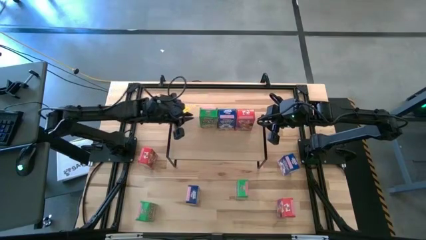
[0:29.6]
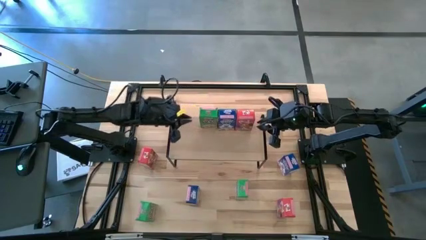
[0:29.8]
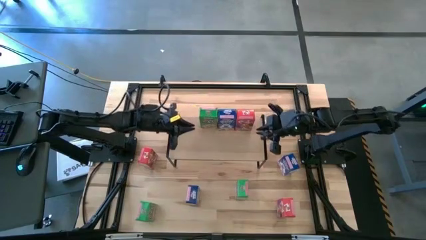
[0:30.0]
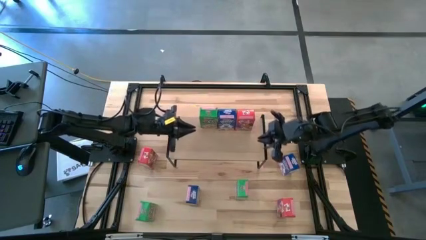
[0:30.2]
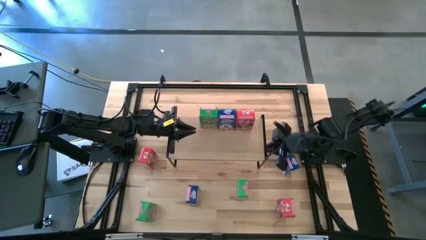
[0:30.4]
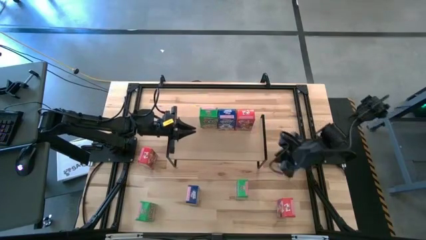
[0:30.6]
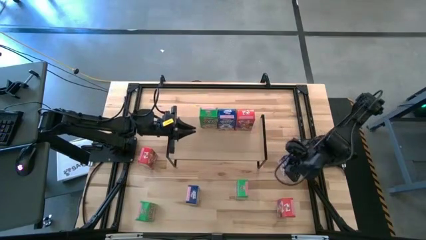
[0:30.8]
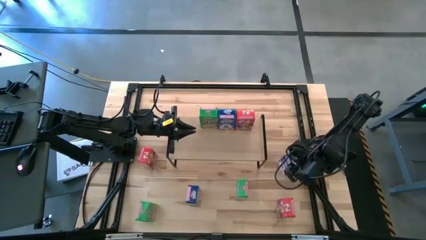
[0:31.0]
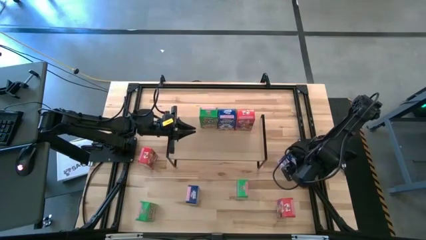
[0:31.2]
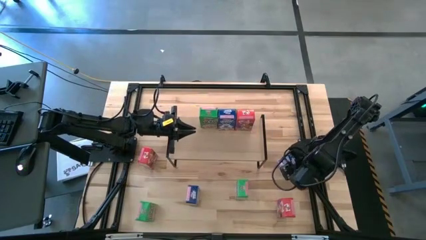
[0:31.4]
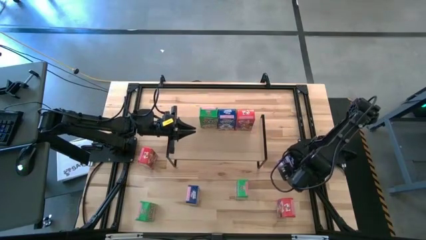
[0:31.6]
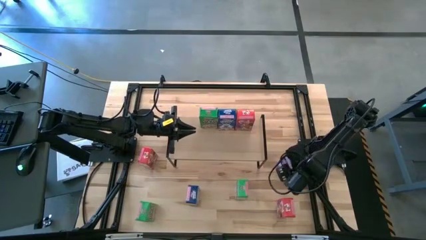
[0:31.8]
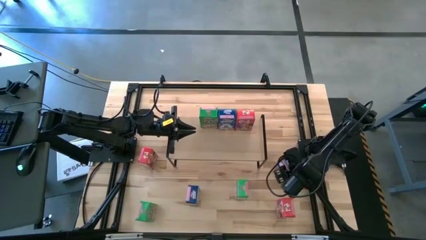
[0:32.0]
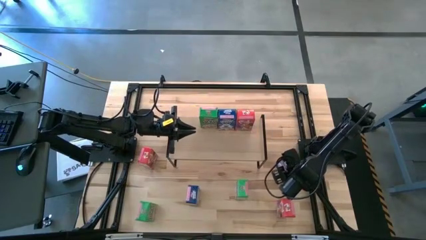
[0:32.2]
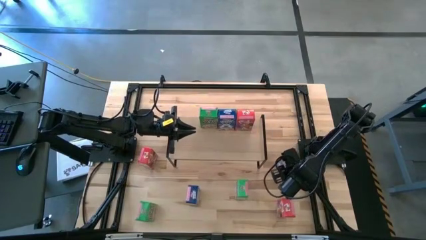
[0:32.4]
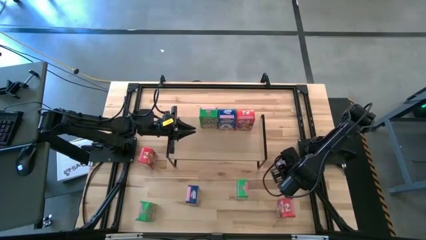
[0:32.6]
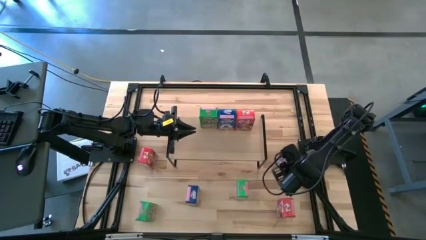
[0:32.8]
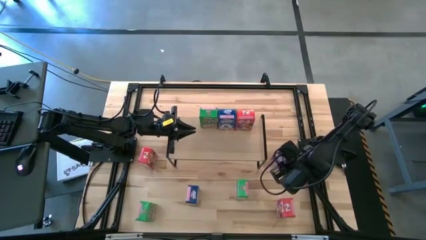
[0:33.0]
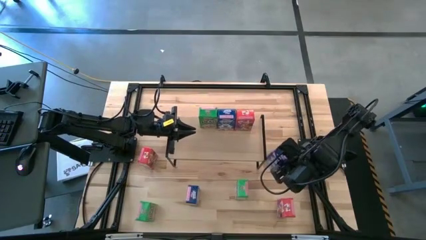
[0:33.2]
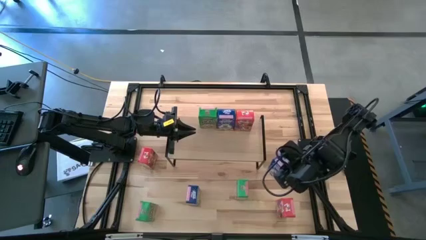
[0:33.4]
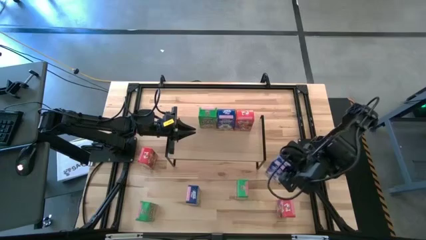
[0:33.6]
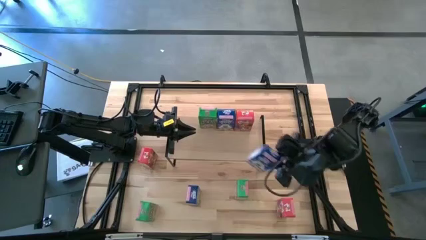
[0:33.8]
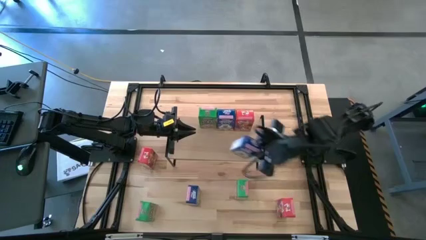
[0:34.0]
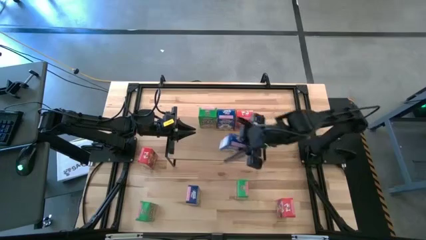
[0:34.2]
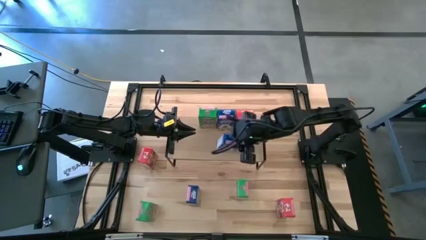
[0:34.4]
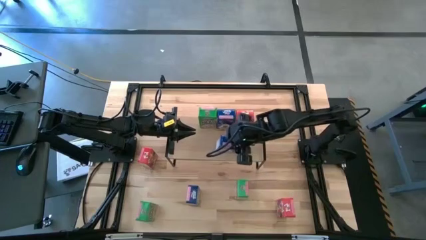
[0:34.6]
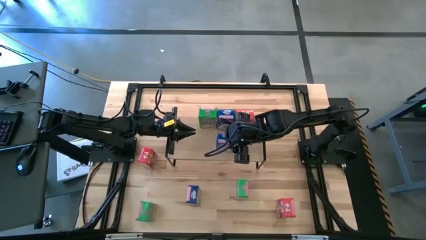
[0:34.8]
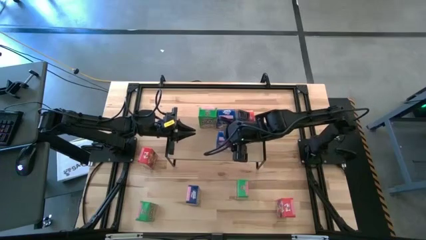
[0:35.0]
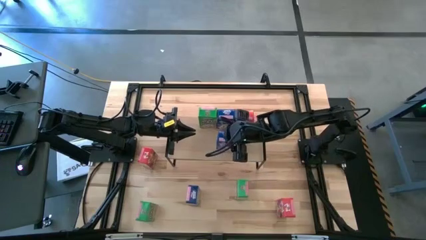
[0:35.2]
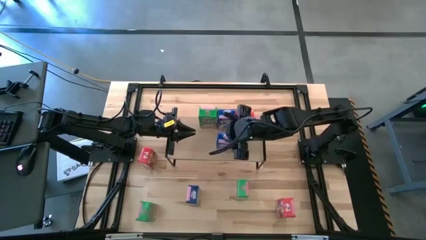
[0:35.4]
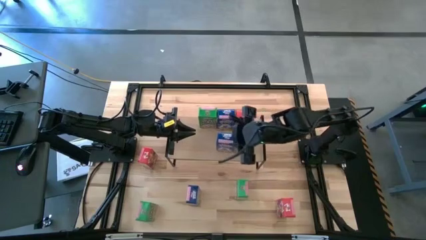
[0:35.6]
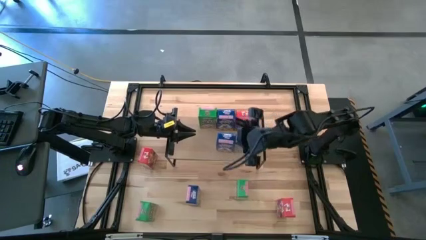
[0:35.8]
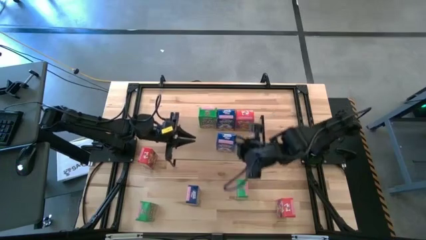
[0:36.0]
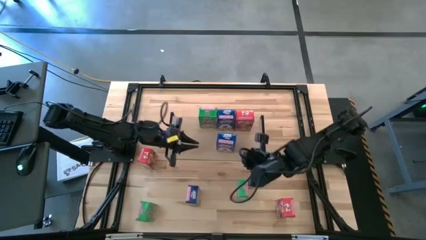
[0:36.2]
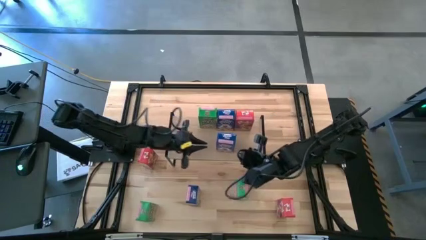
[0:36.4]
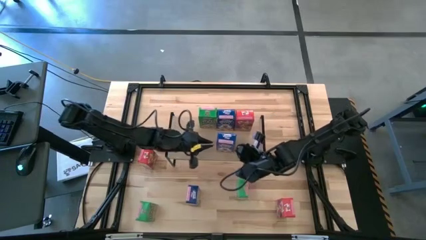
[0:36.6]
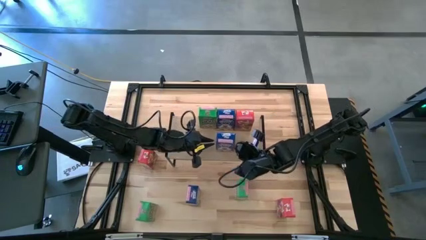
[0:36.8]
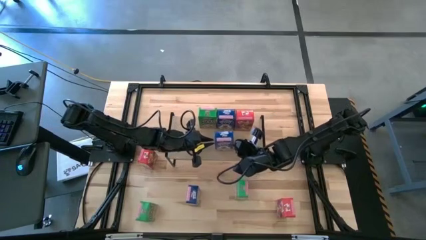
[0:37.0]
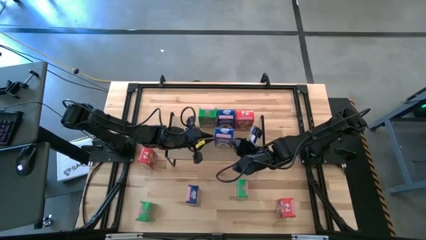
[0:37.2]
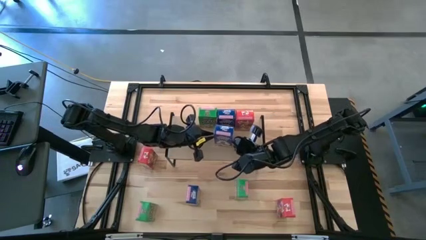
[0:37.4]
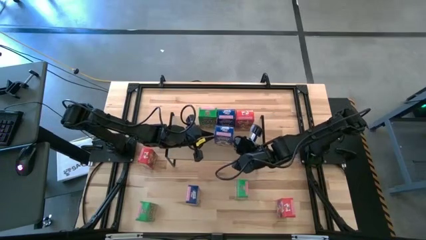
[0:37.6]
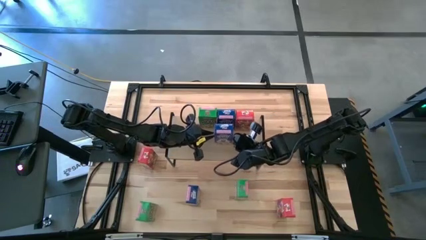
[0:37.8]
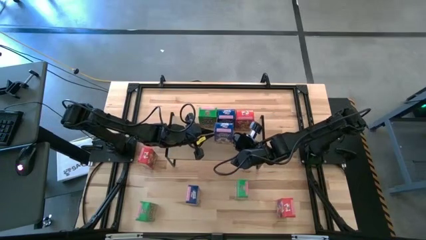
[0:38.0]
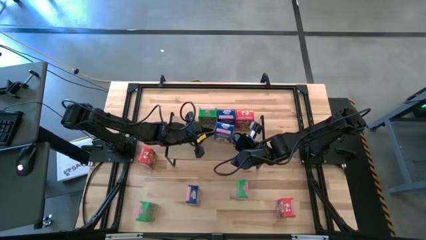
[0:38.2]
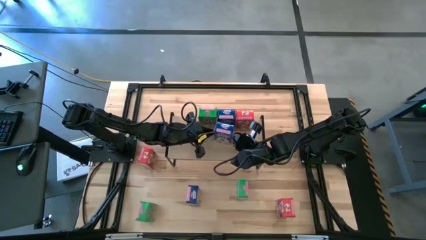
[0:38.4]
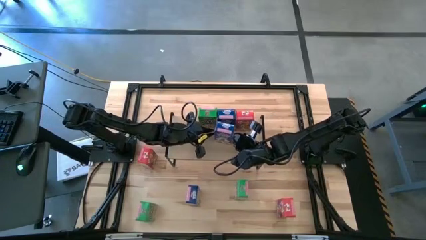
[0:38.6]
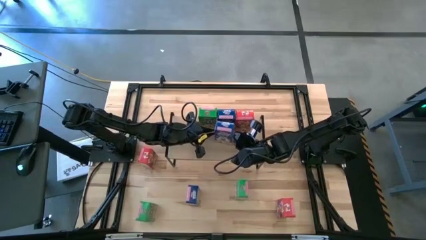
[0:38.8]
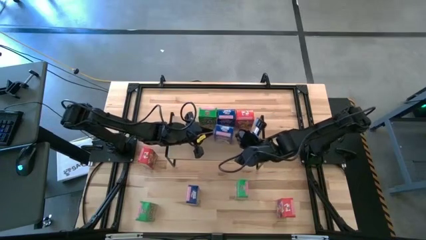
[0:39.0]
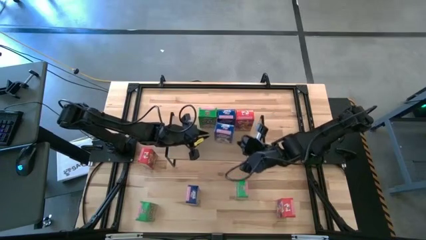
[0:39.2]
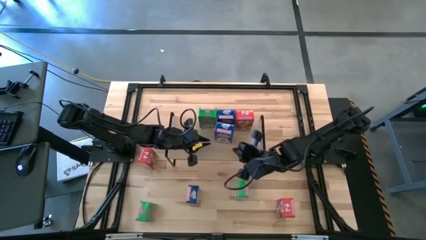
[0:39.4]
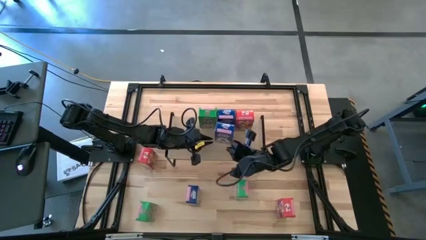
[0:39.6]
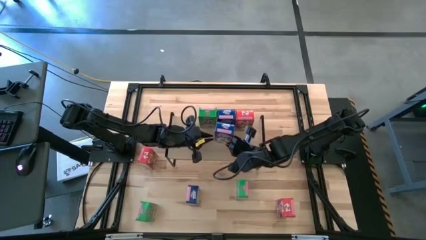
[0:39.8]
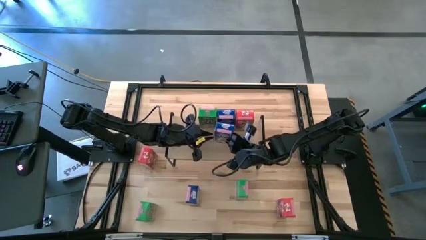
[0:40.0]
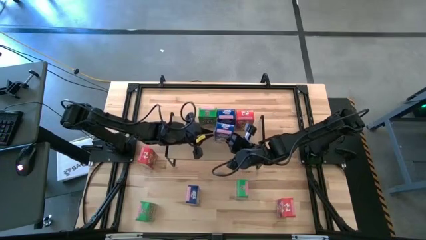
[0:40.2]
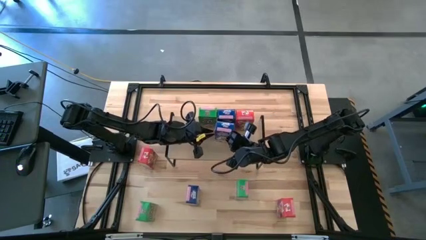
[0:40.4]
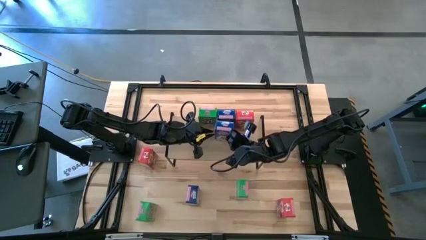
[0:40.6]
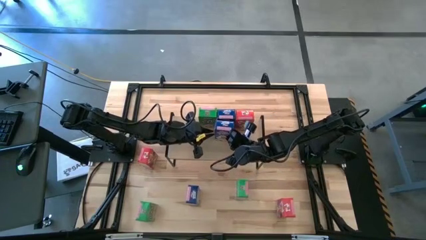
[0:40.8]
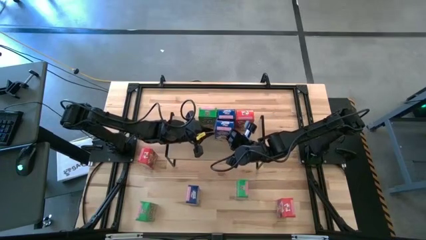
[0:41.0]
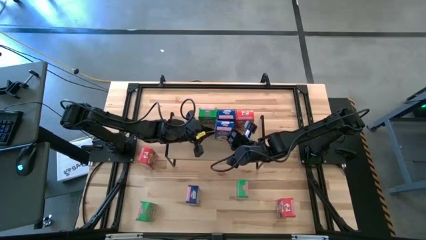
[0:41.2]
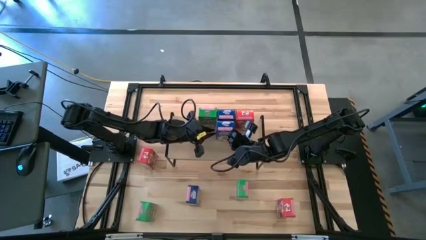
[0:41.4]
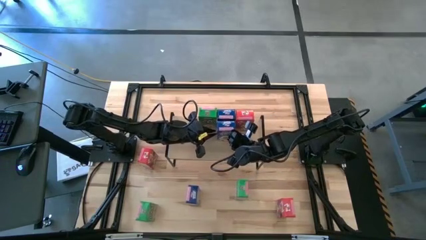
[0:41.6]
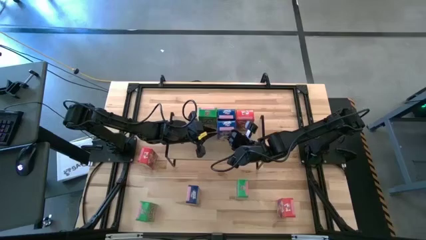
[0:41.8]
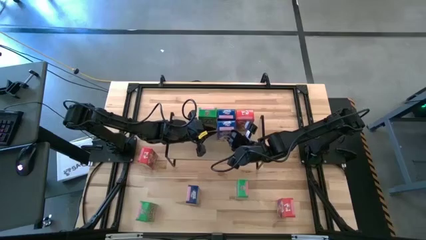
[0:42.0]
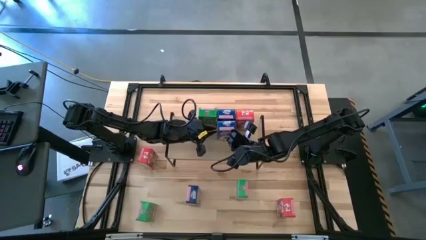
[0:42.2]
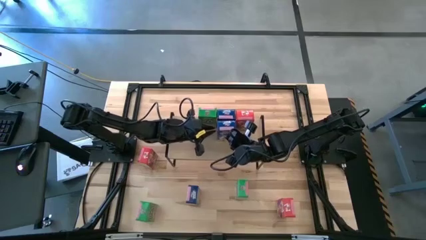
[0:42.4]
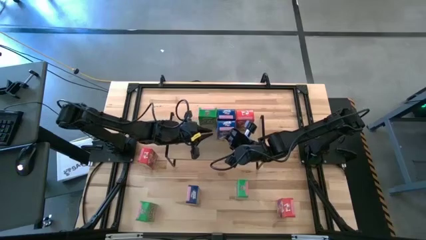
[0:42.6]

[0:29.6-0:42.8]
Task: Stack cereal on shelf
Put the top blue cereal box on the shelf aligned with the other blue cereal box
